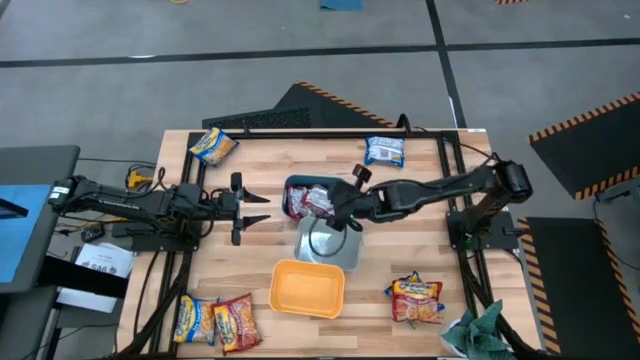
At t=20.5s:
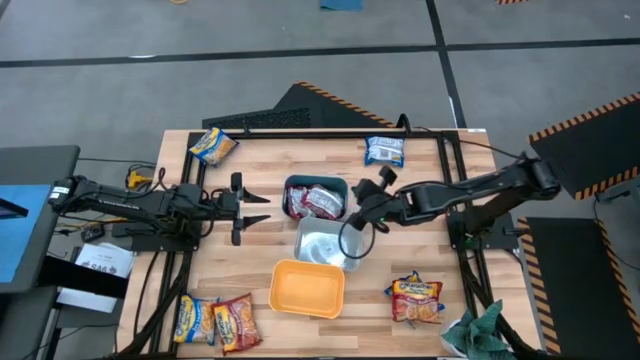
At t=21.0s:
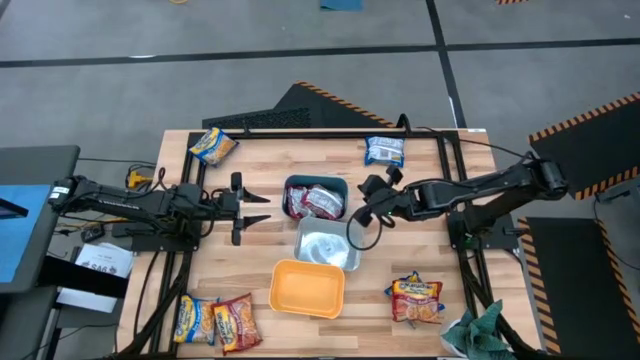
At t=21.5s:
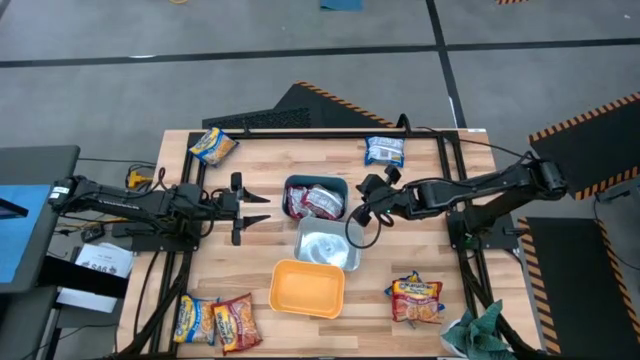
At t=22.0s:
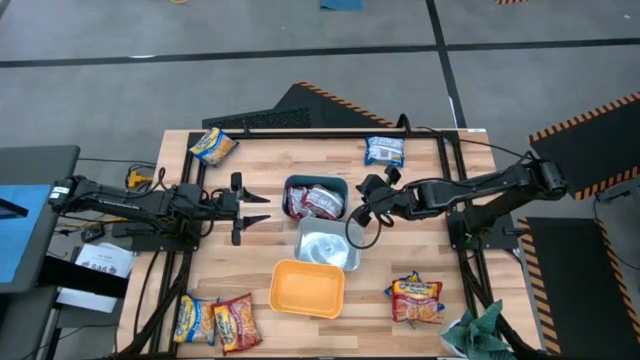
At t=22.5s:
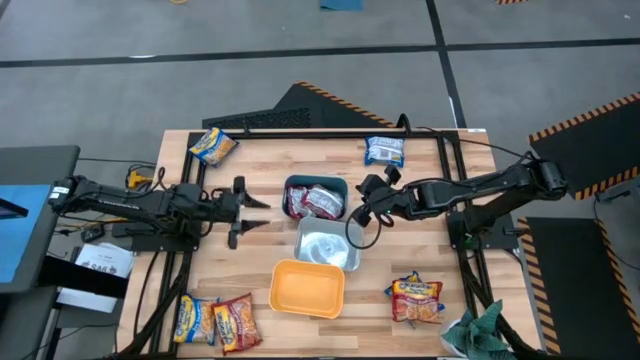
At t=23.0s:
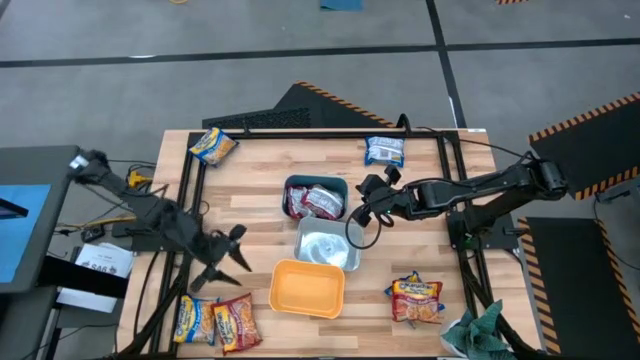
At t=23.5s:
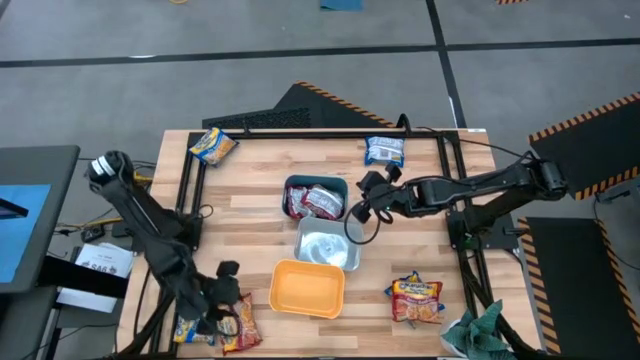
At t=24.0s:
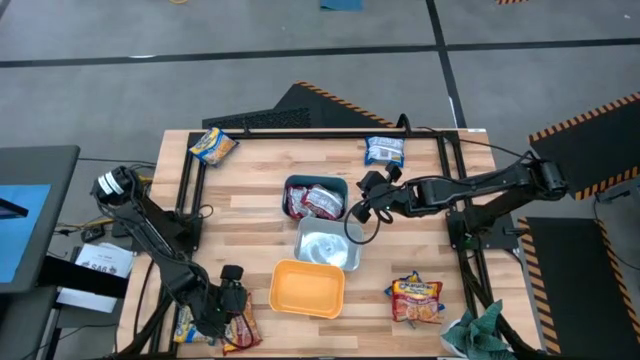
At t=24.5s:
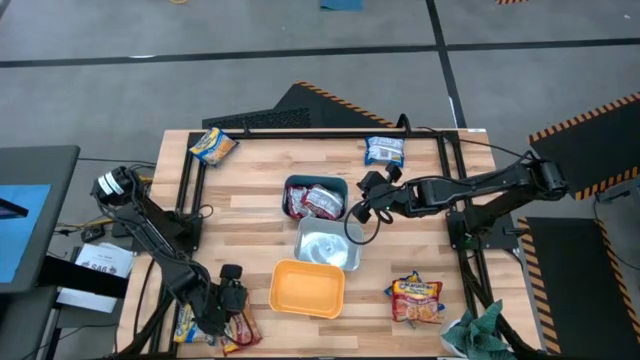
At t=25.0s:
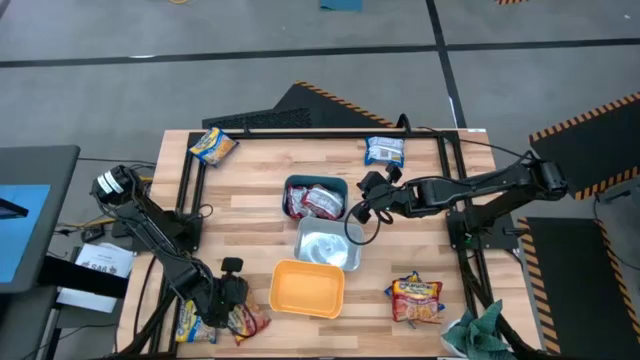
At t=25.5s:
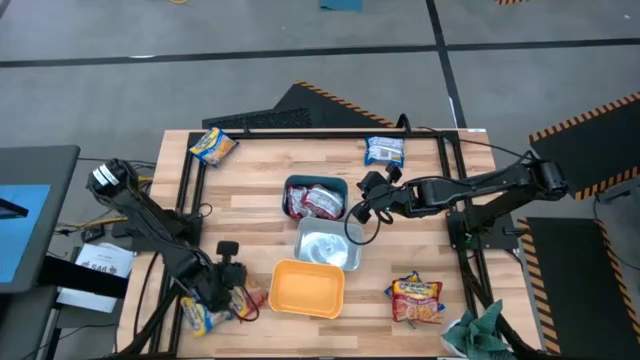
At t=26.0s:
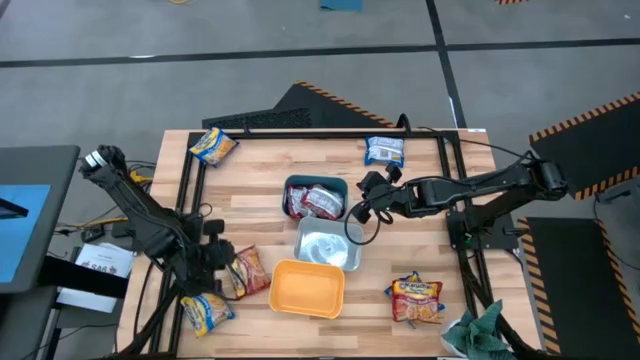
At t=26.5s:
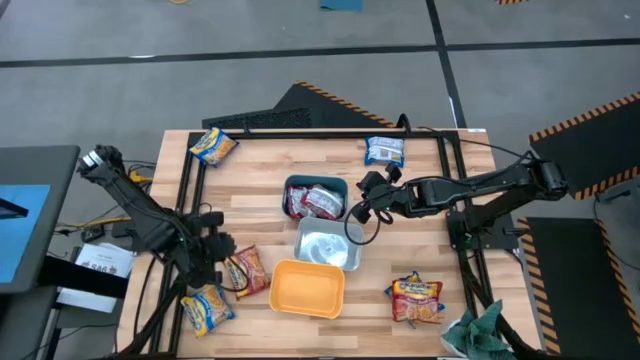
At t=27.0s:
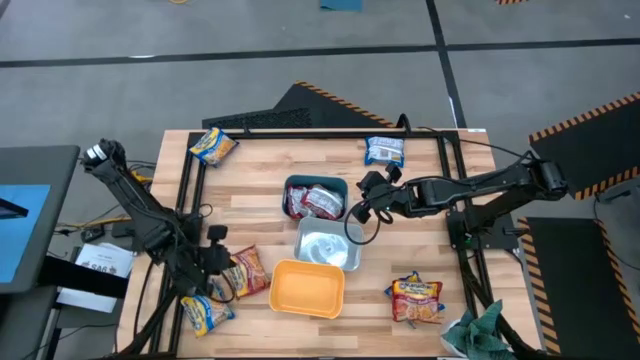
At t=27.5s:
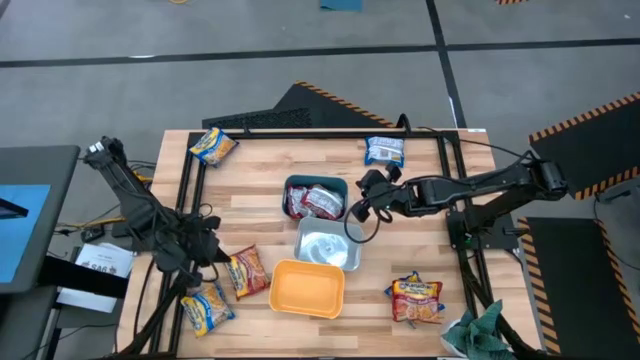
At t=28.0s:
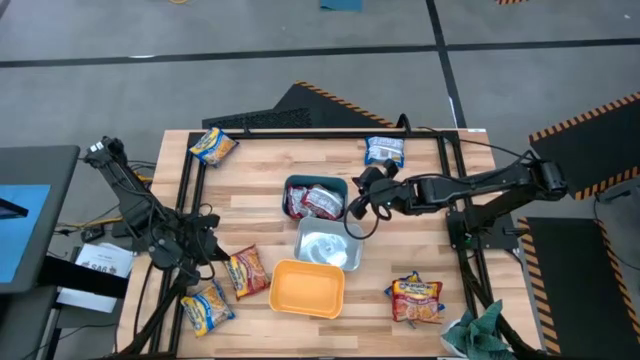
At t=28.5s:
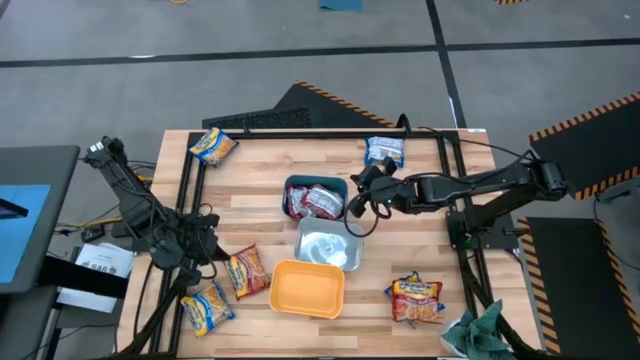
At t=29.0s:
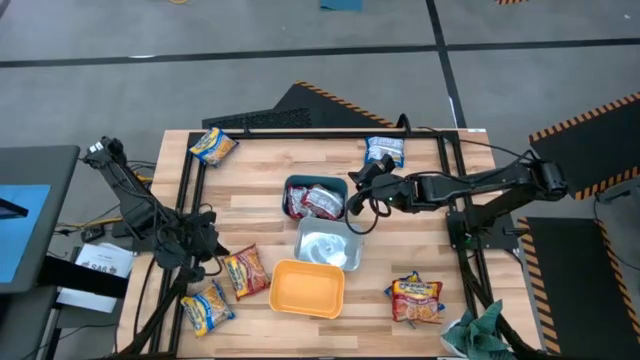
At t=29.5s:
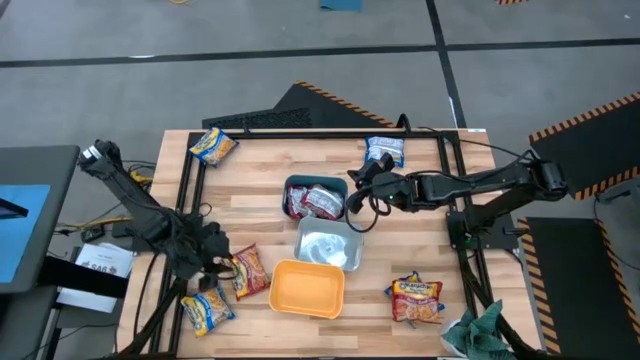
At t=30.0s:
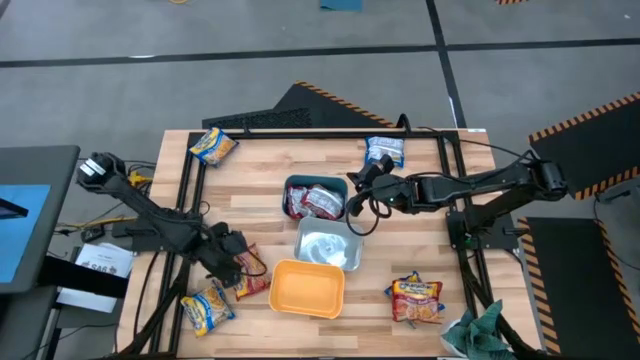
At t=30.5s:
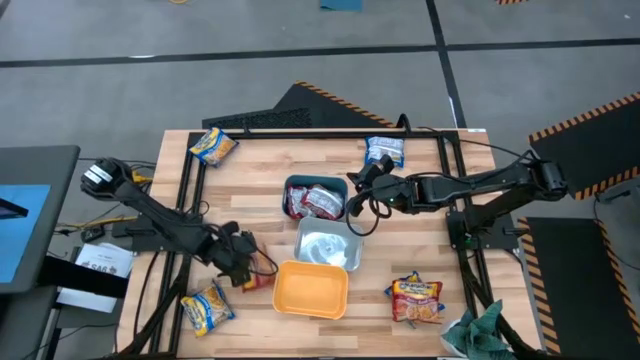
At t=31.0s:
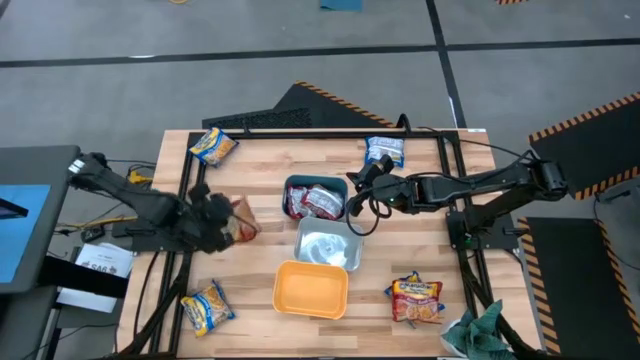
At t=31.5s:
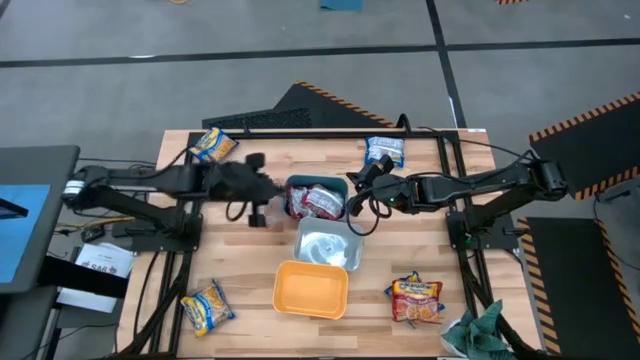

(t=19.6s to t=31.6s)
Task: Sort Maruchan noodles
Put the left red noodle pack into the blue bin

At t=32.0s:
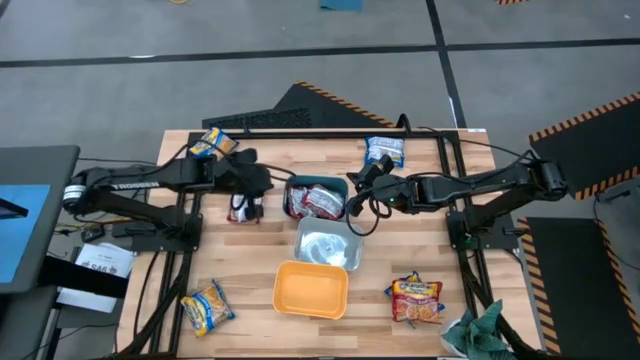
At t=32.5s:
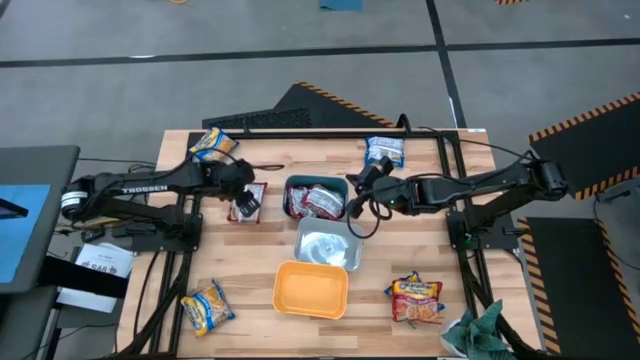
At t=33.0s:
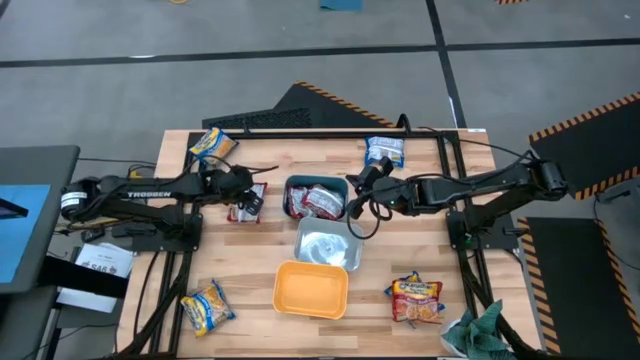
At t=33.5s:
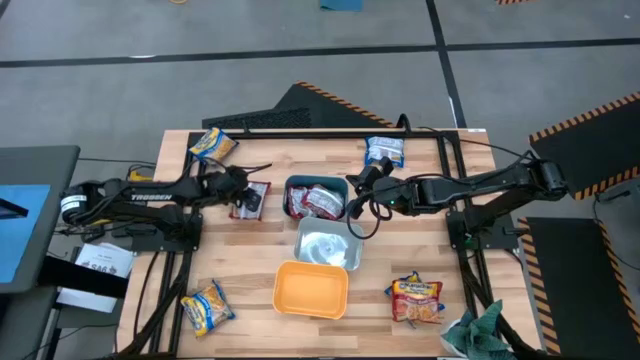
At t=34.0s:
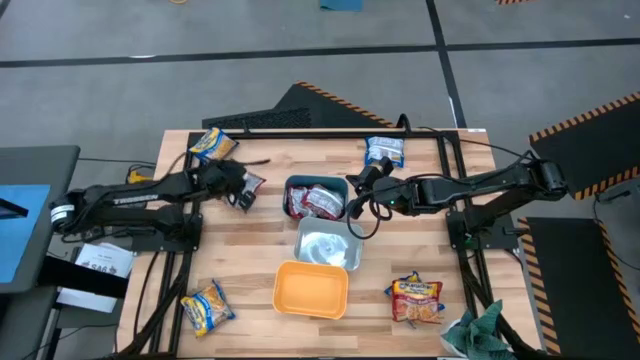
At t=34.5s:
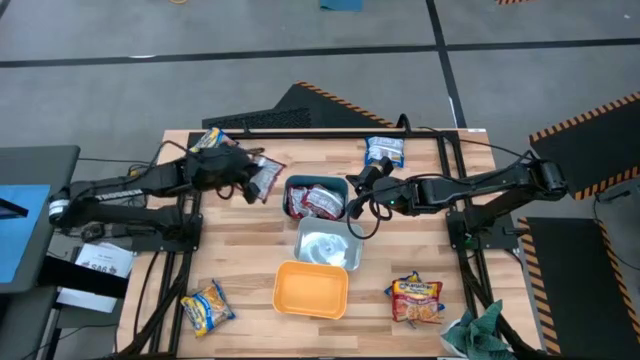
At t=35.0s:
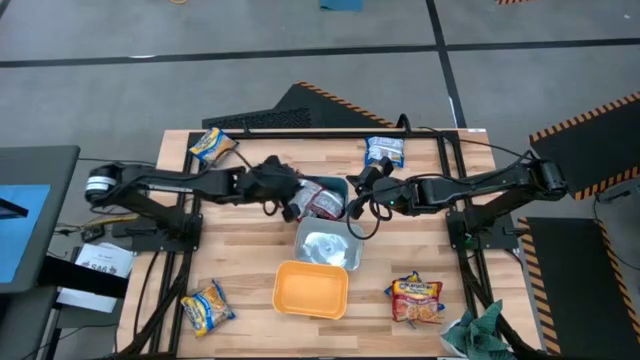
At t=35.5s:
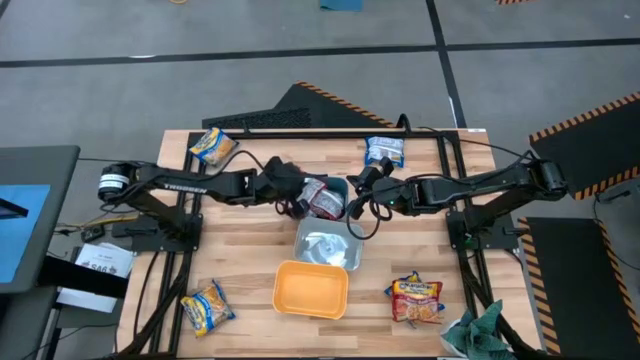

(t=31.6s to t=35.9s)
Put the left red noodle pack into the blue bin

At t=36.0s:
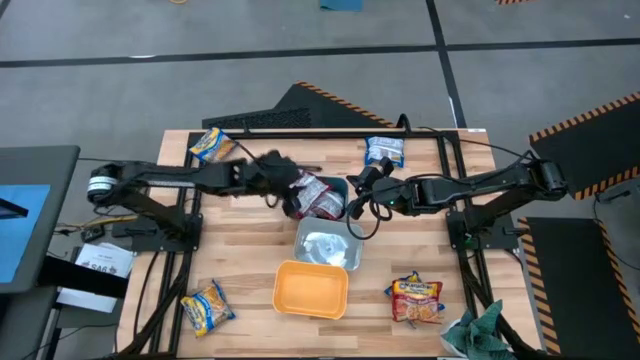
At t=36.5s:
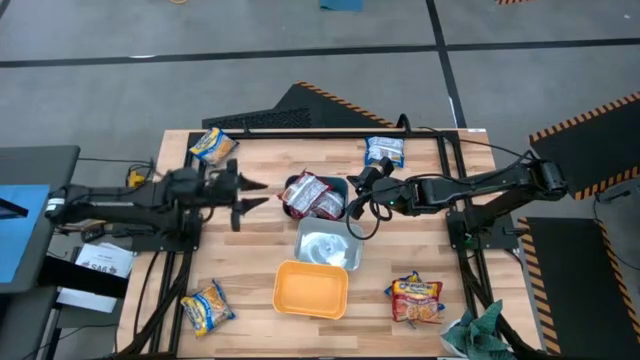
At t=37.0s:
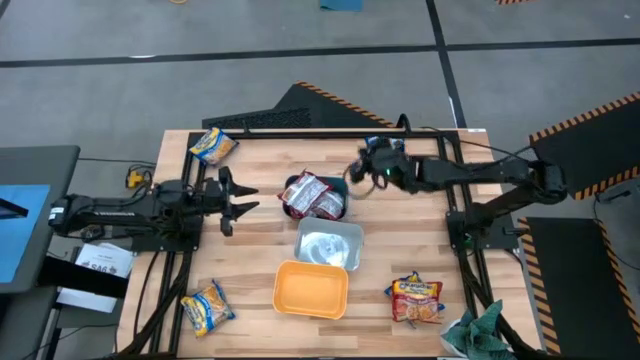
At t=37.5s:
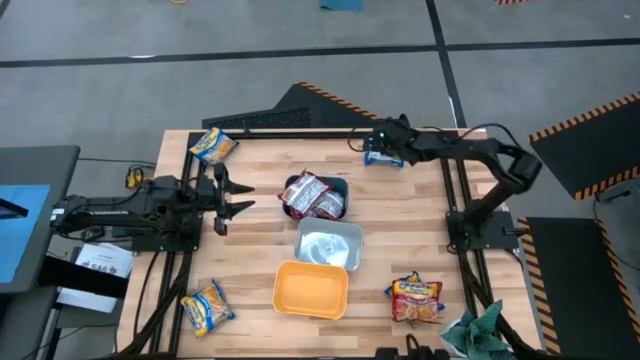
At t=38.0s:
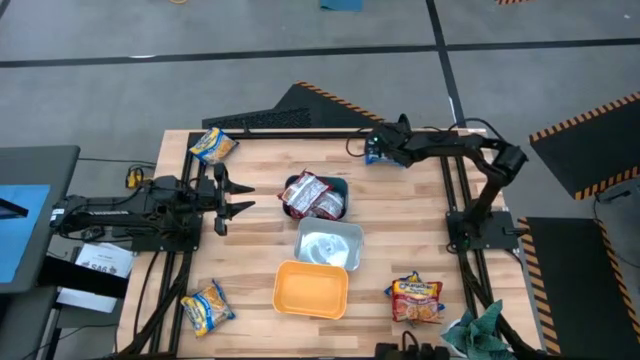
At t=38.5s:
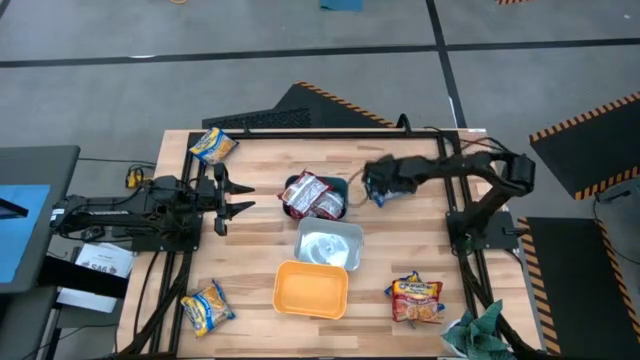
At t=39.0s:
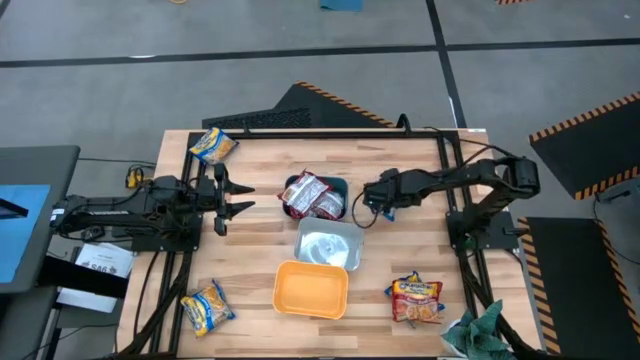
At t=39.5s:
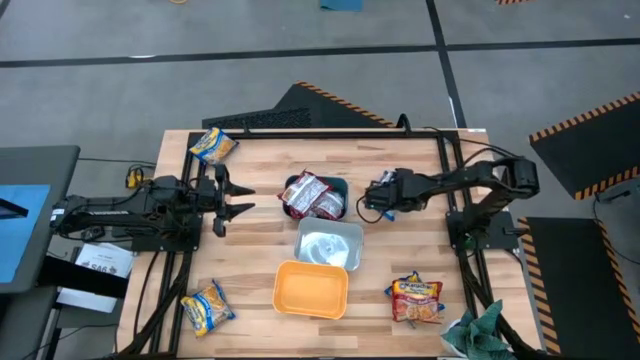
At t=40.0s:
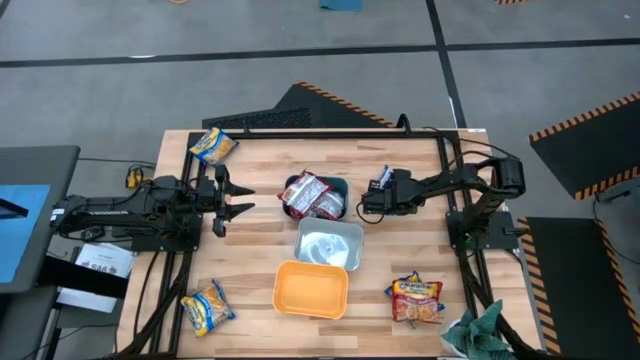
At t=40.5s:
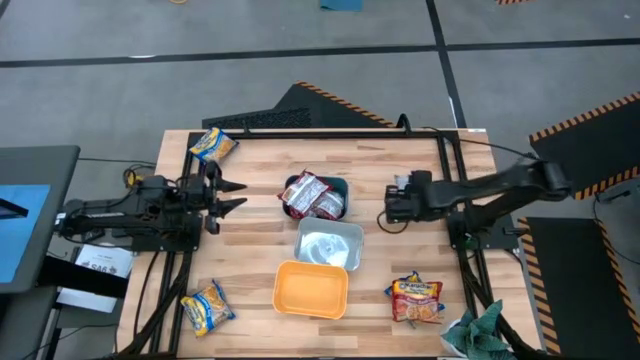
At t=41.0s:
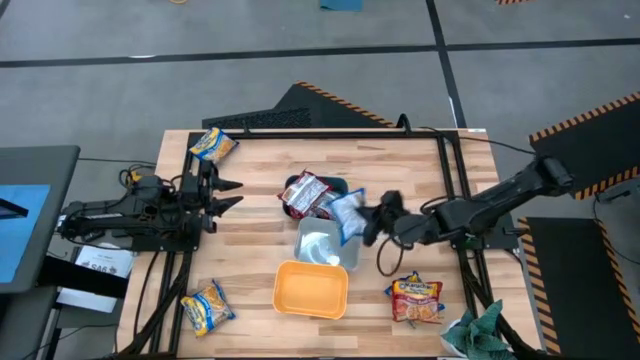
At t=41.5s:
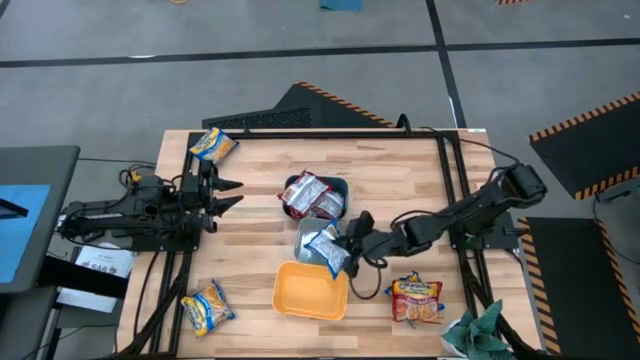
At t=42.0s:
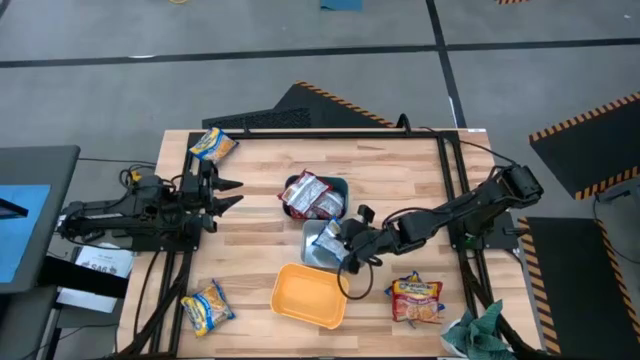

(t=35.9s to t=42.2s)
Put the top right blue noodle pack into the gray bin
